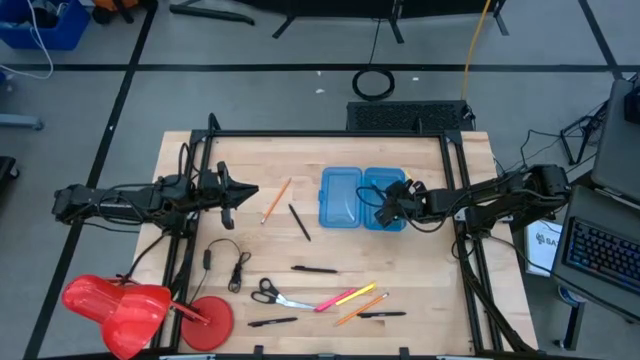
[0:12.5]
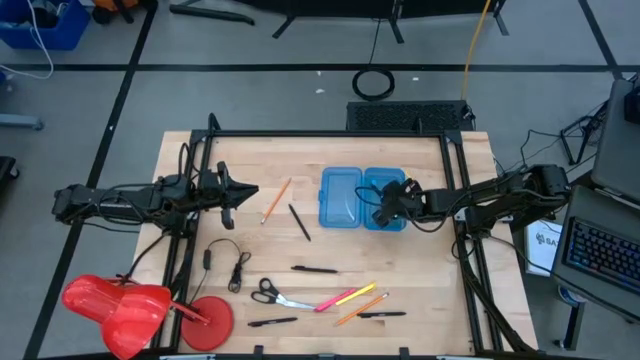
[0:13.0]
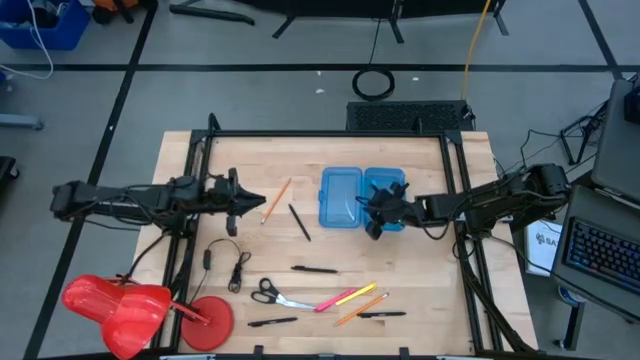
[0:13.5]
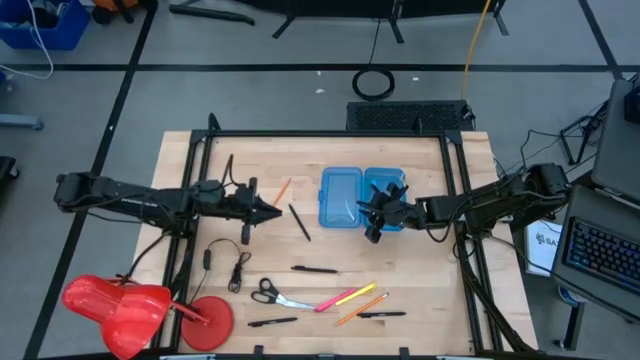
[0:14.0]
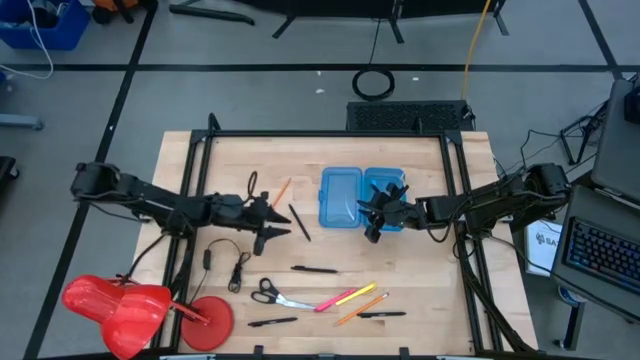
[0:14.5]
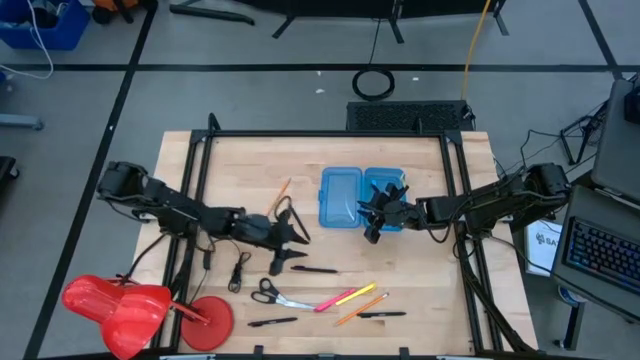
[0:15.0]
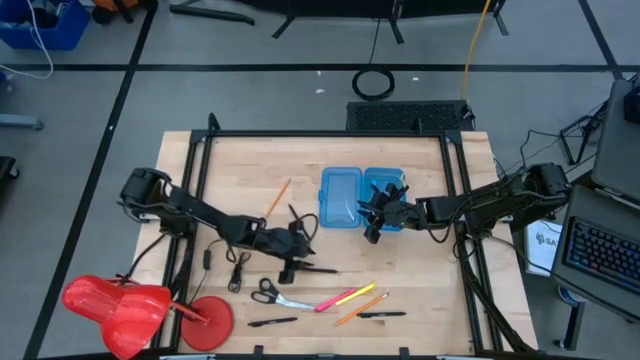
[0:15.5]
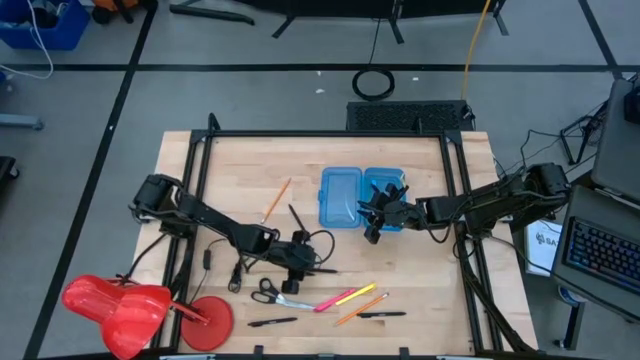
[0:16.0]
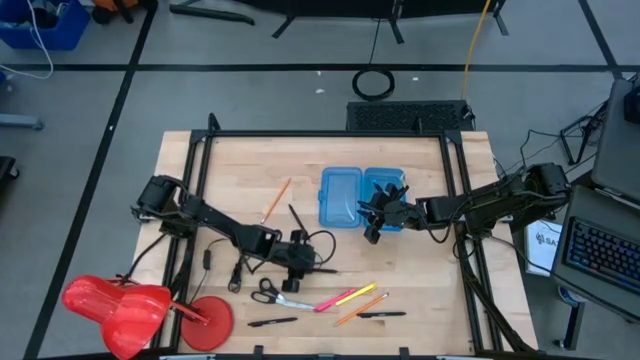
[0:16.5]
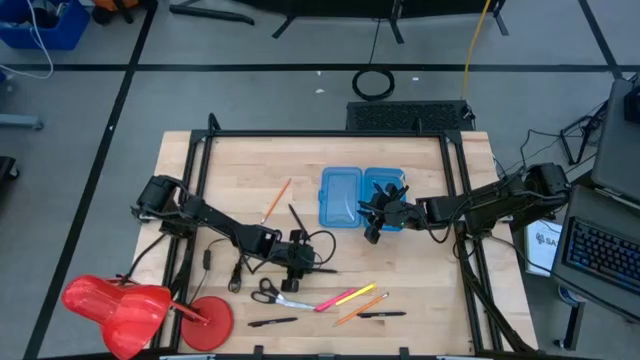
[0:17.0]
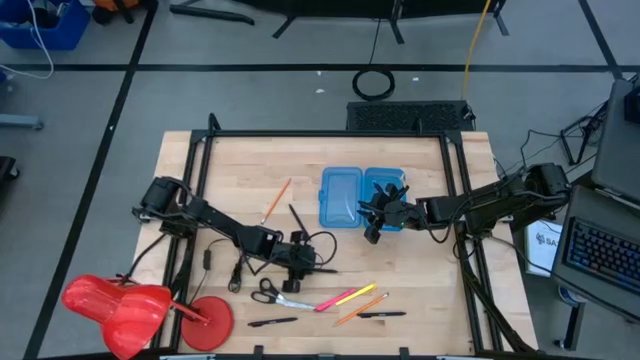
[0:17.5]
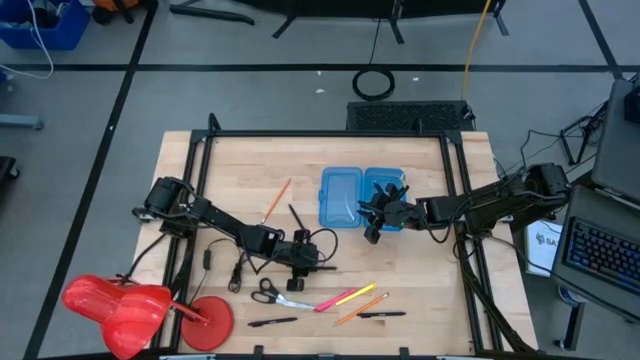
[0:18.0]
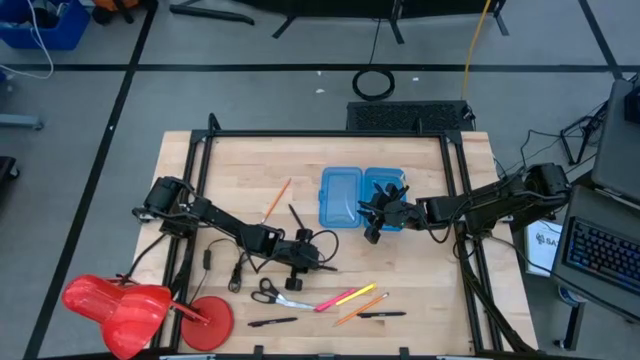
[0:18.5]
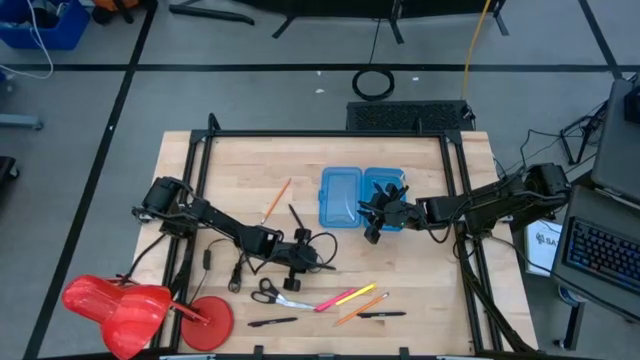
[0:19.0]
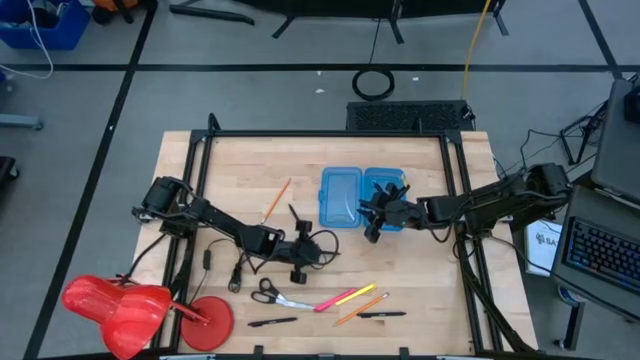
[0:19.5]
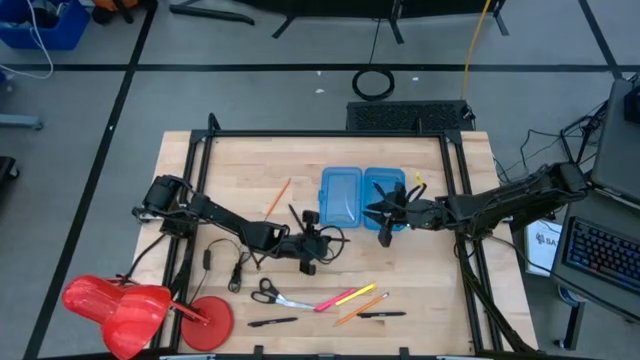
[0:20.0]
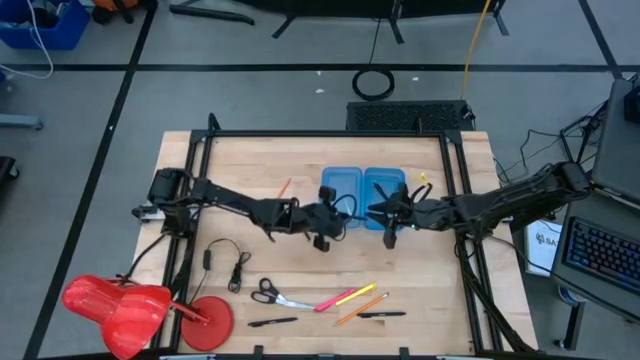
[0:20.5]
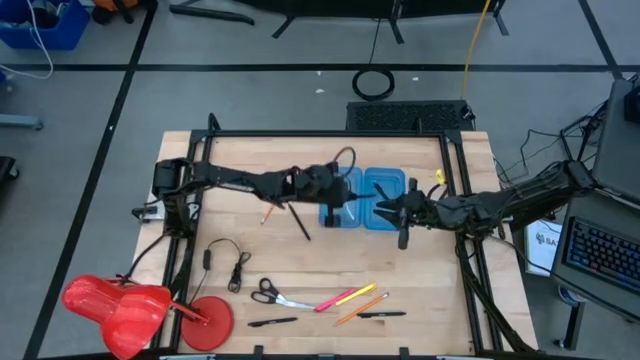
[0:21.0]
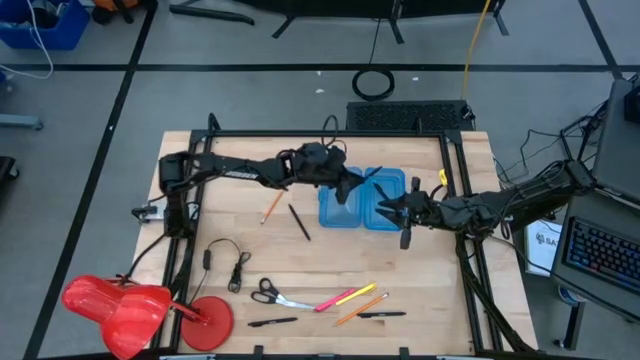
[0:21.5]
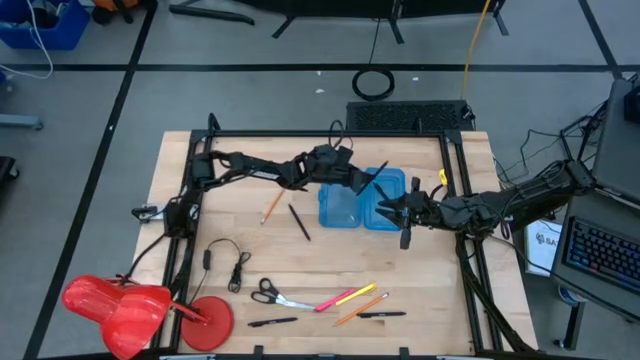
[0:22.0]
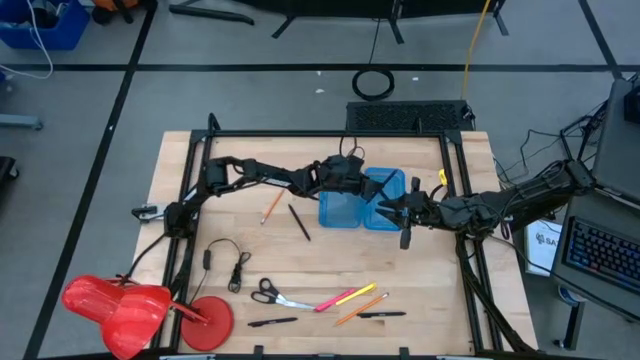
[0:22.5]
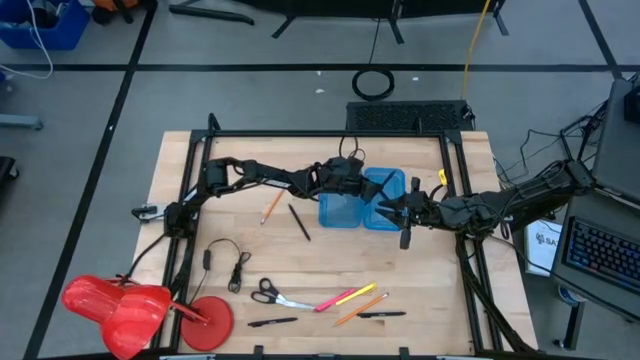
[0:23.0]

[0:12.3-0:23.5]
Task: Pick & place school supplies into a supply box
Put the black pen into the blue supply box

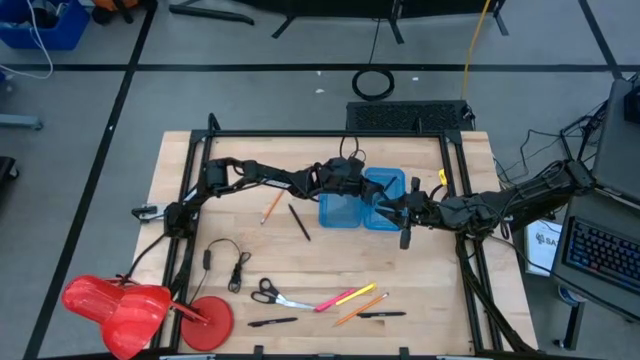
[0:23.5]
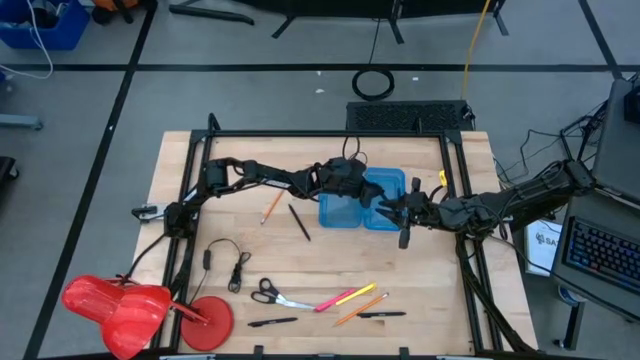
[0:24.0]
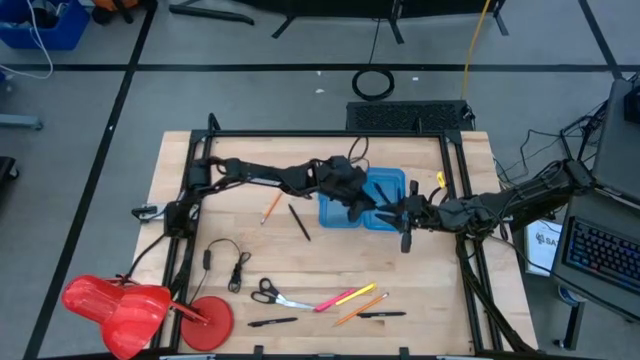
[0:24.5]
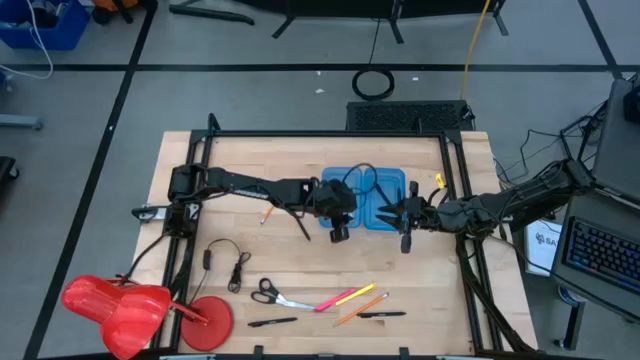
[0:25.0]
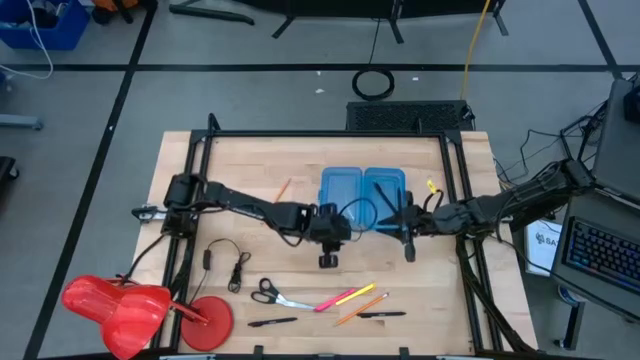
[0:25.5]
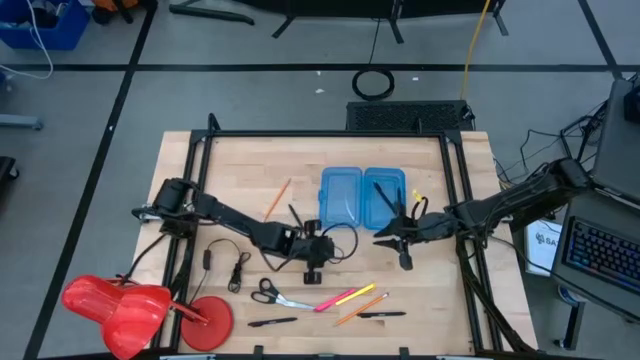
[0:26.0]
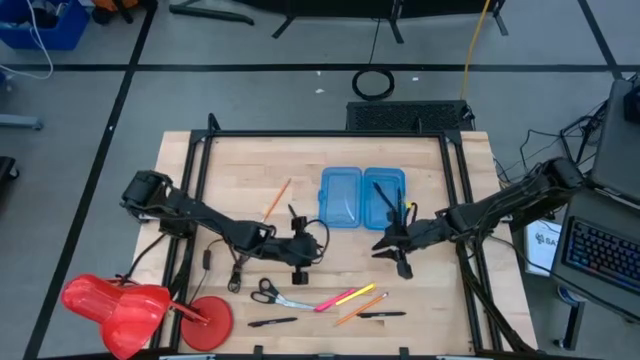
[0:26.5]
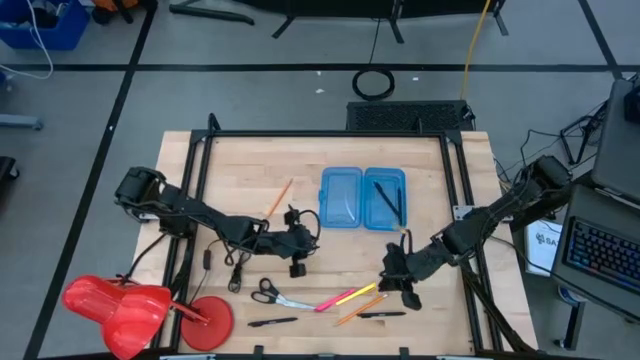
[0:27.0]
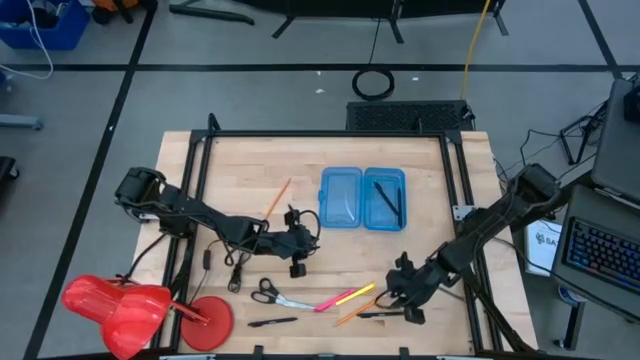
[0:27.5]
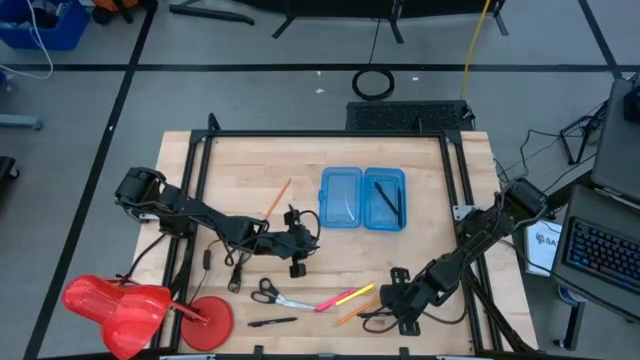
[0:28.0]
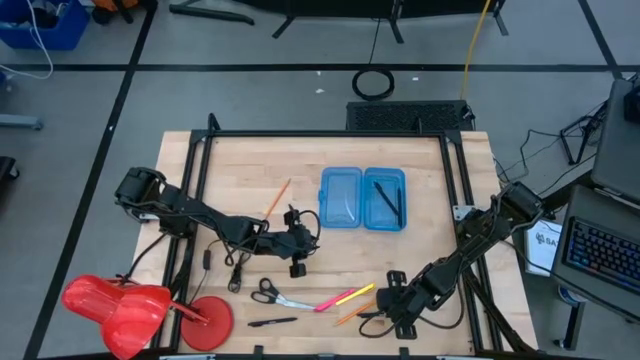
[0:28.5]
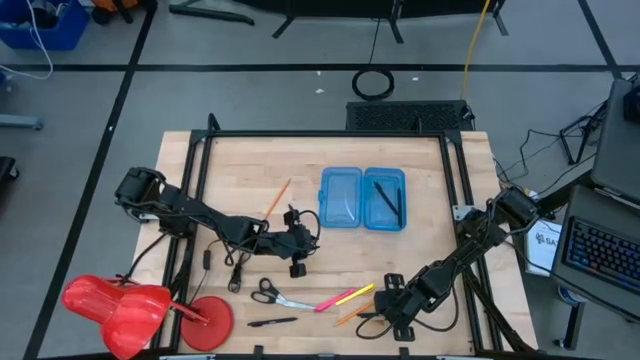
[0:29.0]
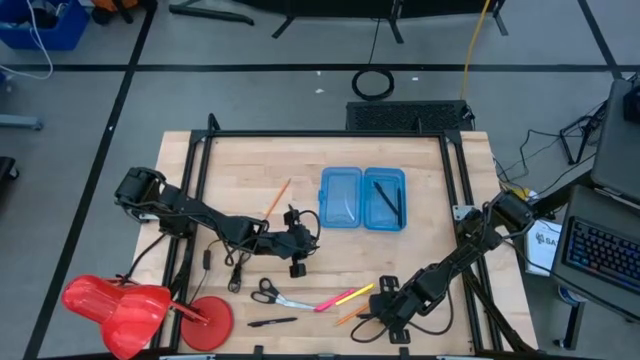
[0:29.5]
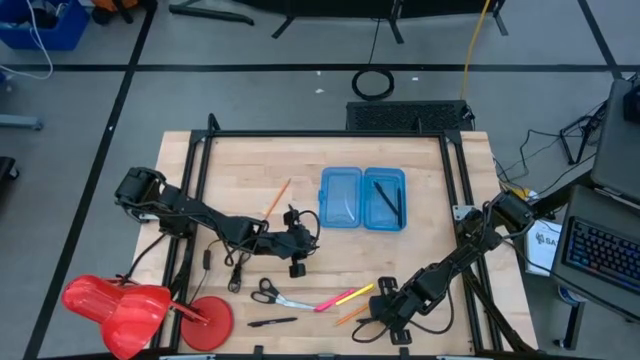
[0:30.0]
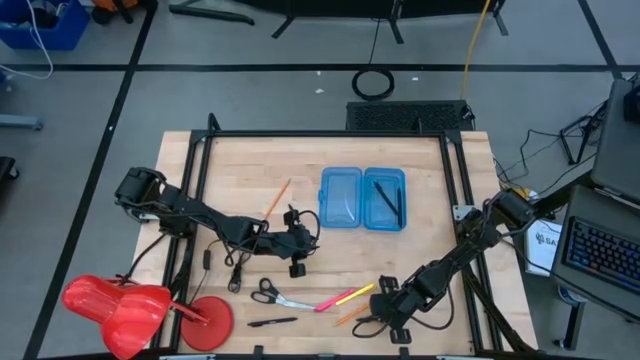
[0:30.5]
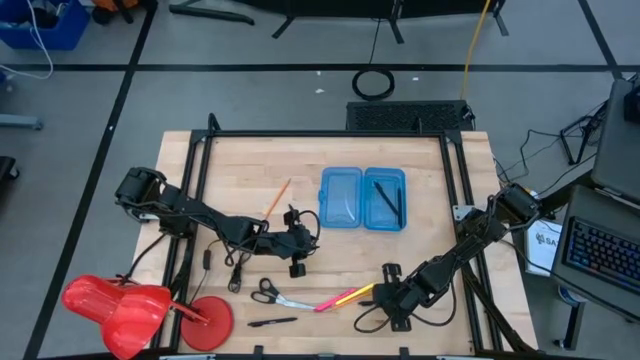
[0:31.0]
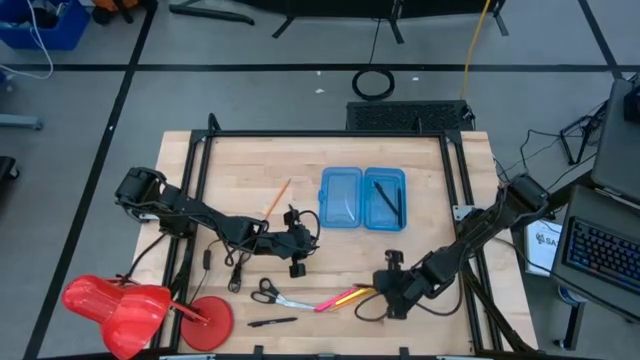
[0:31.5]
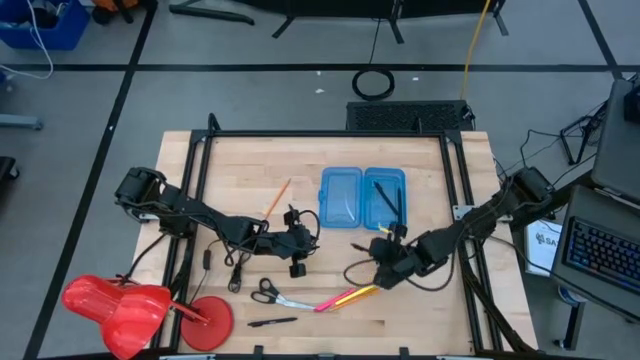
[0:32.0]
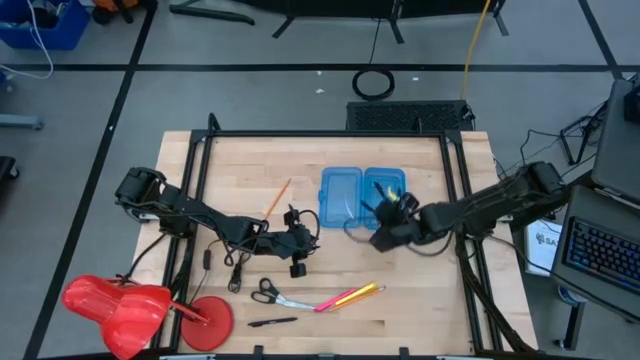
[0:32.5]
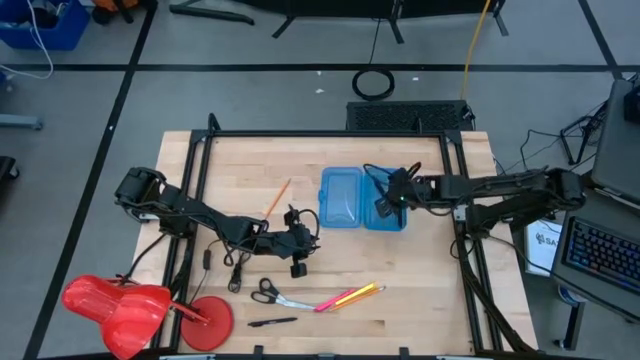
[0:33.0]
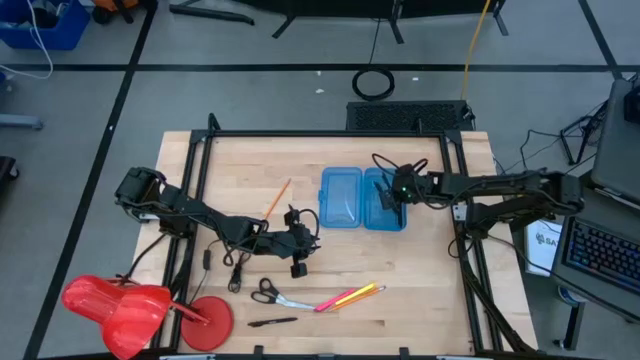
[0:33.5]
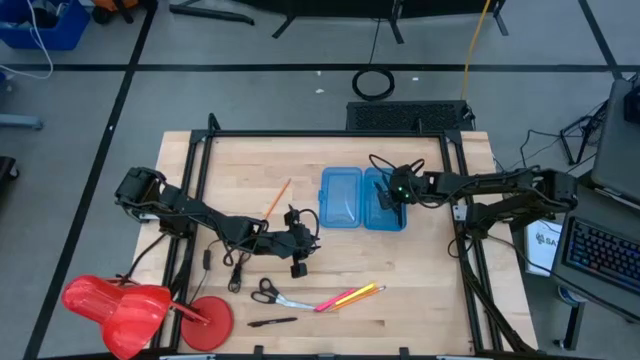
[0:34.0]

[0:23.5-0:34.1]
Put the black pen into the blue supply box
